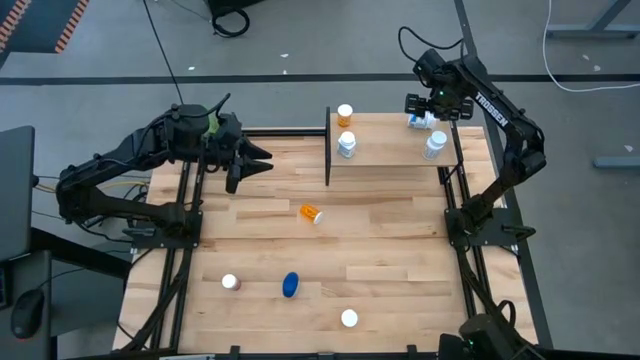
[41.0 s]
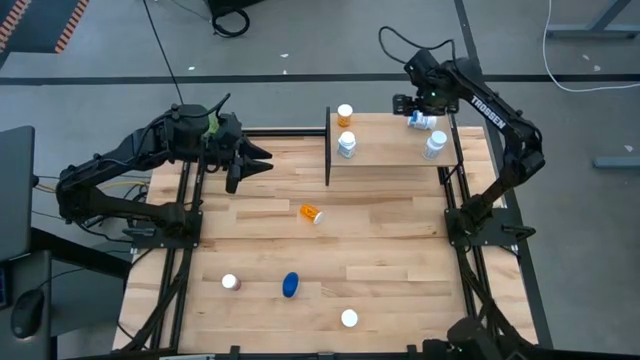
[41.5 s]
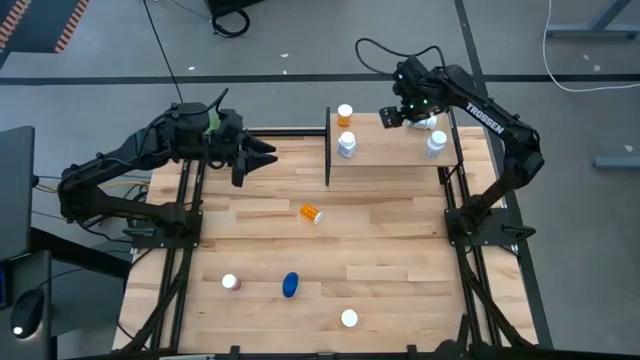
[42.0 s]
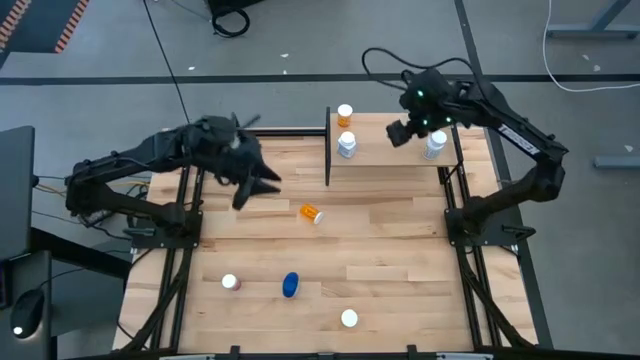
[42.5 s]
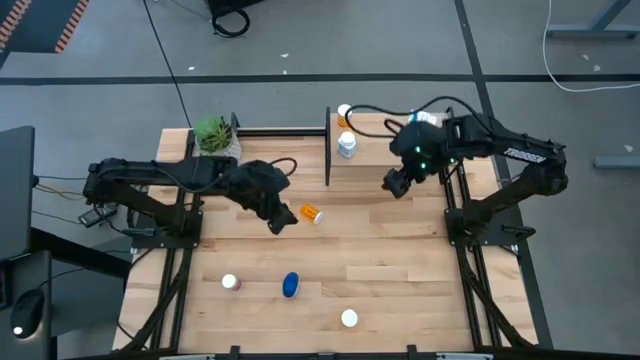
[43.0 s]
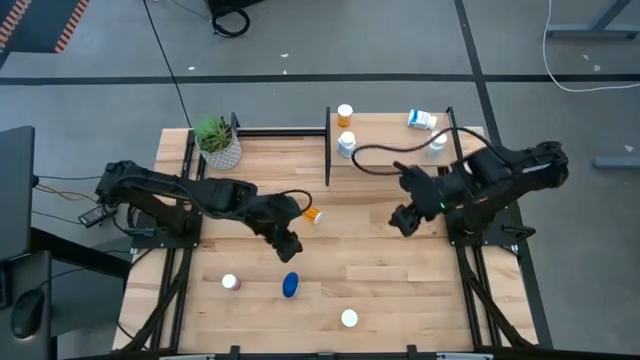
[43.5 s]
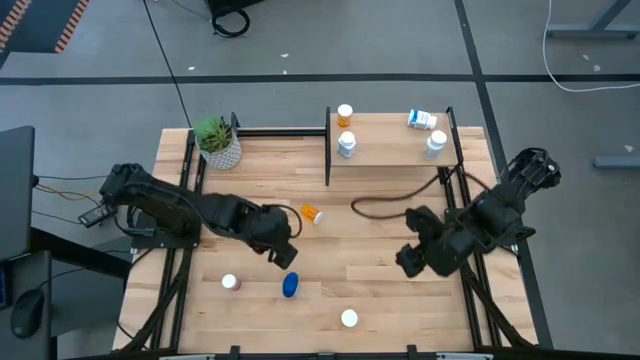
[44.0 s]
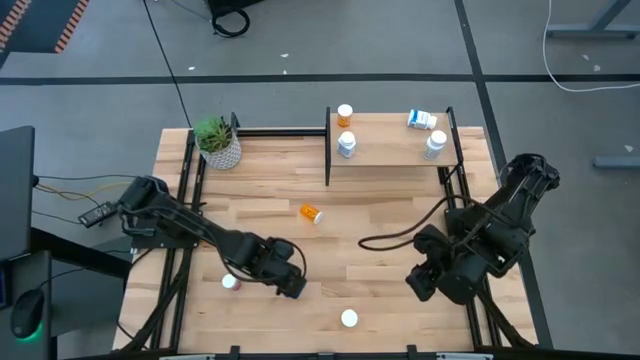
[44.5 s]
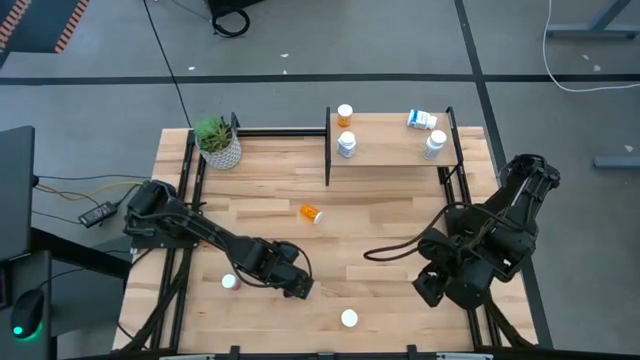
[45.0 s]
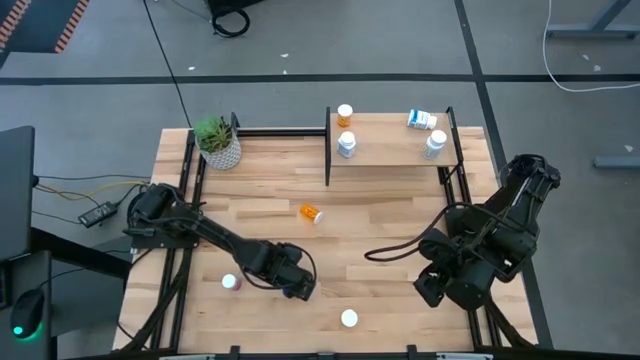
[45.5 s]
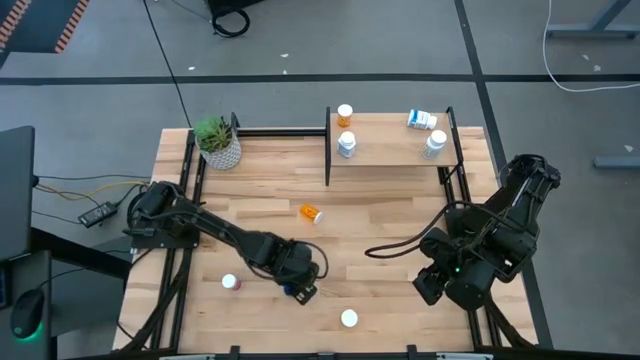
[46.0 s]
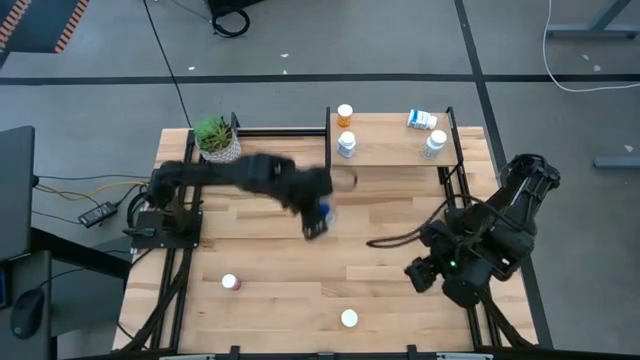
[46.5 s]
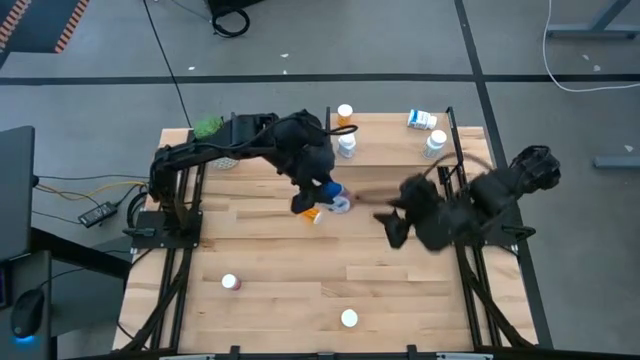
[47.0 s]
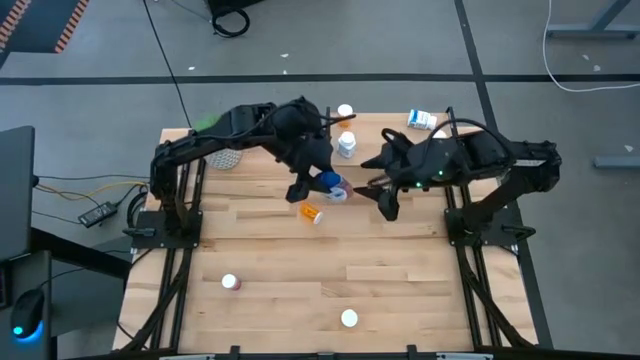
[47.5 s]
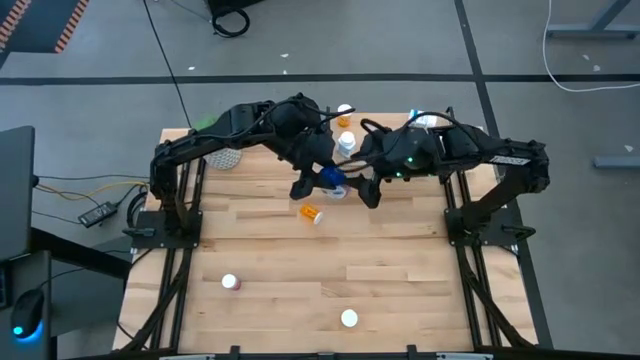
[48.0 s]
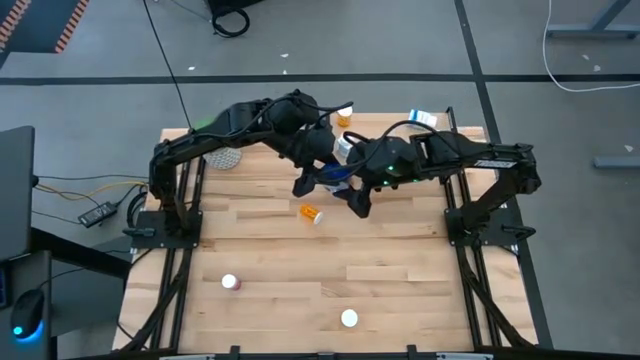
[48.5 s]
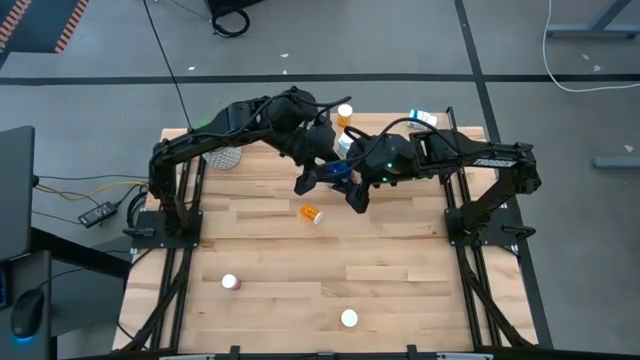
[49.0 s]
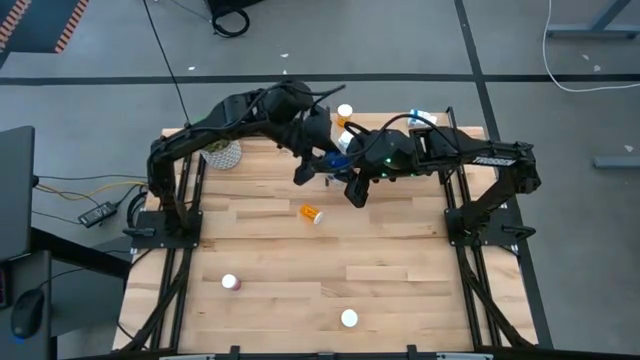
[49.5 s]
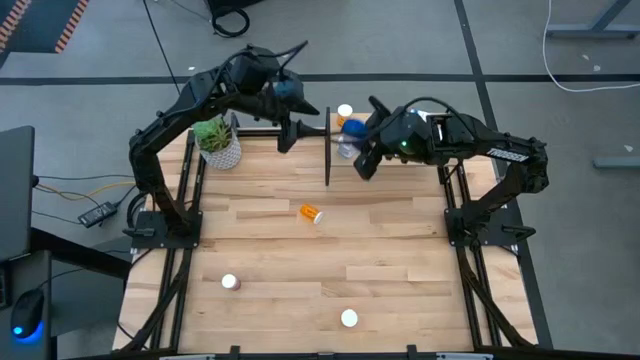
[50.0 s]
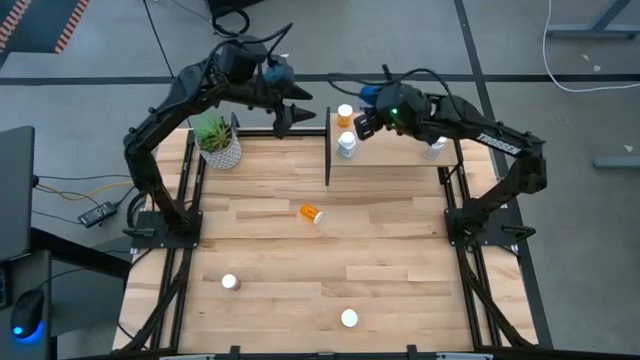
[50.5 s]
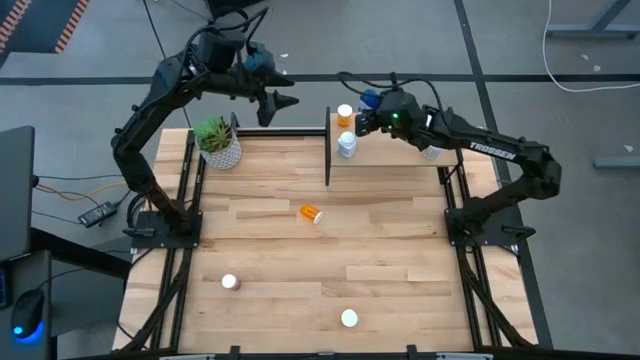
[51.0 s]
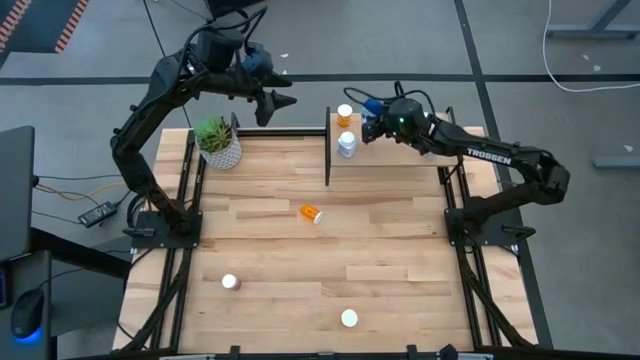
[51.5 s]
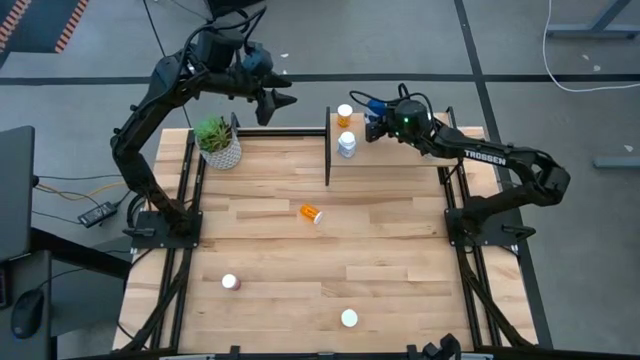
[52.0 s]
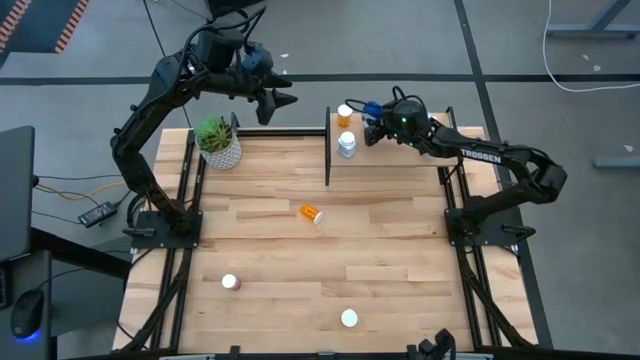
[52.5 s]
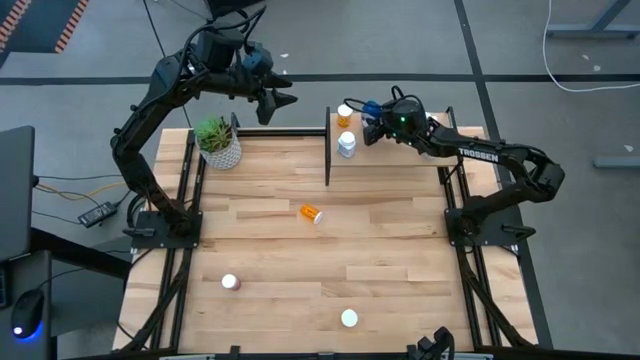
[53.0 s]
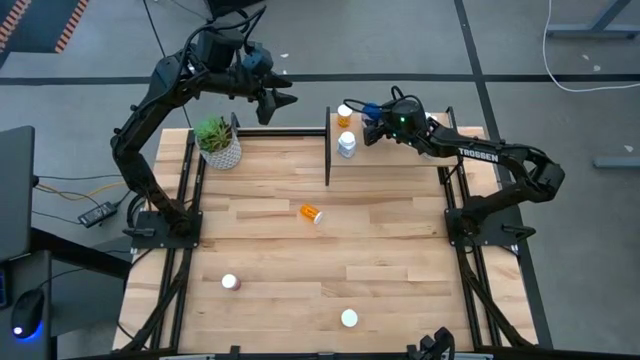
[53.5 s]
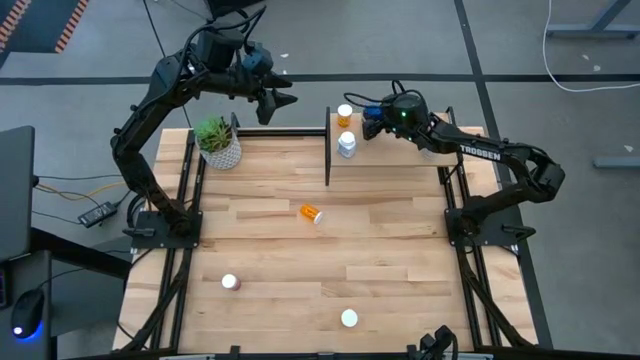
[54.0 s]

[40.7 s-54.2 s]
Task: Pick and place medicine bottles onto shelf by color
Put the blue pill bottle on the shelf

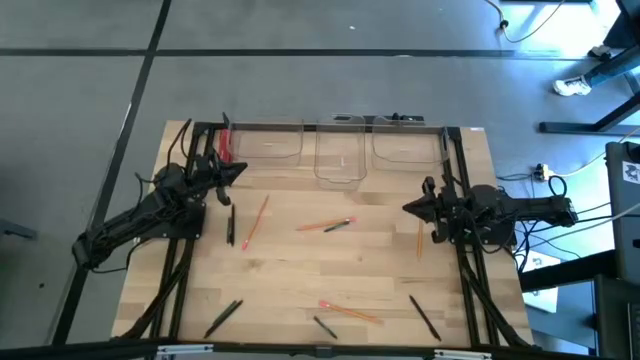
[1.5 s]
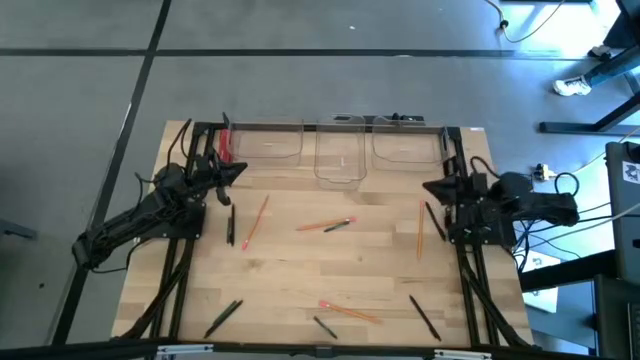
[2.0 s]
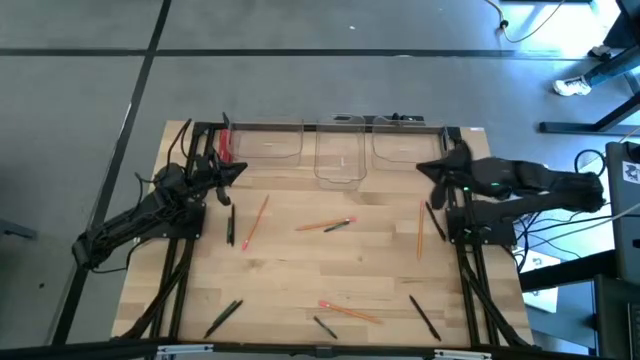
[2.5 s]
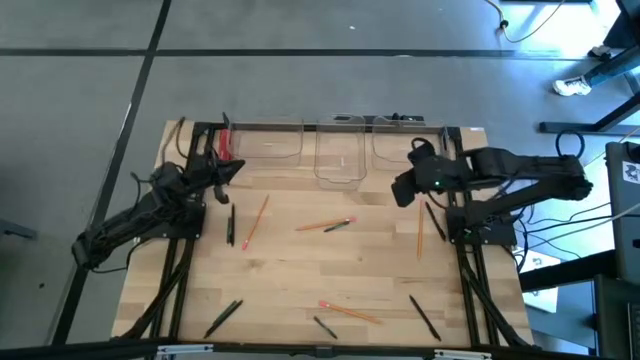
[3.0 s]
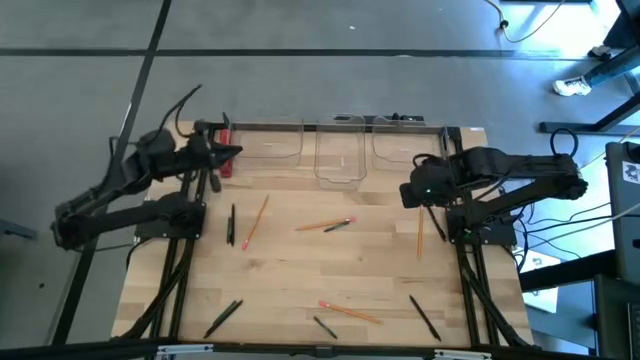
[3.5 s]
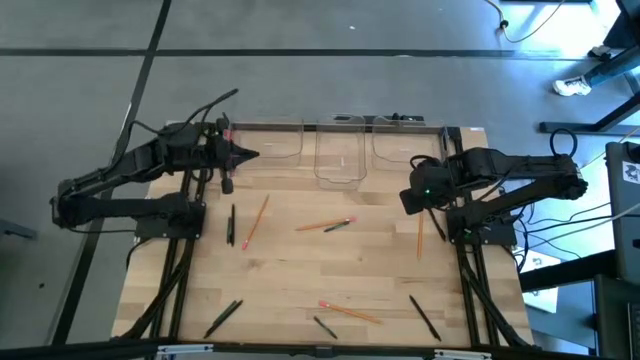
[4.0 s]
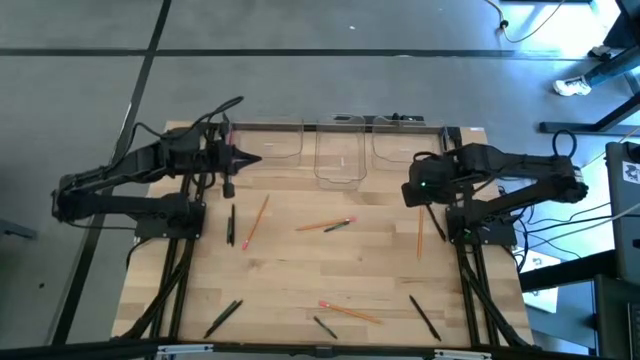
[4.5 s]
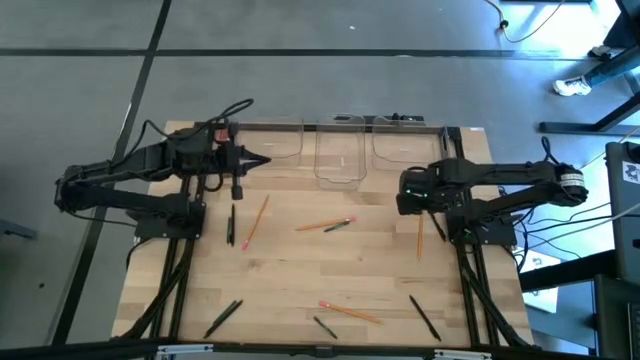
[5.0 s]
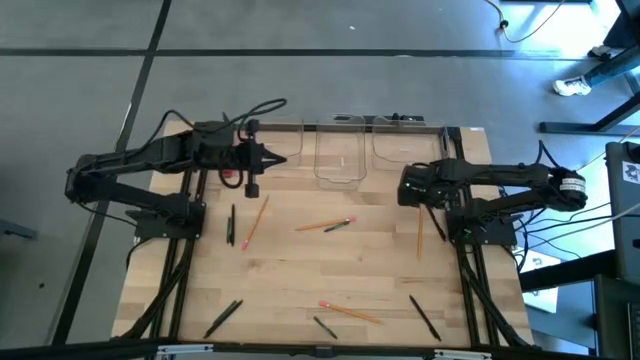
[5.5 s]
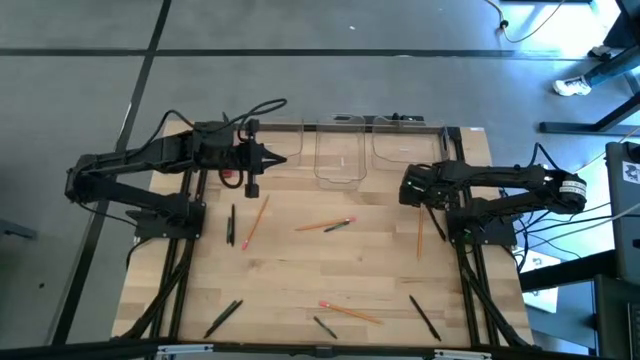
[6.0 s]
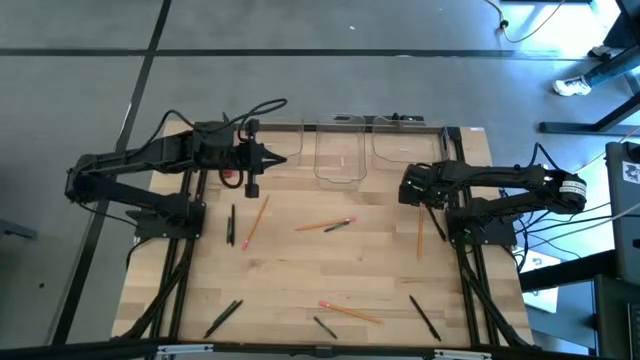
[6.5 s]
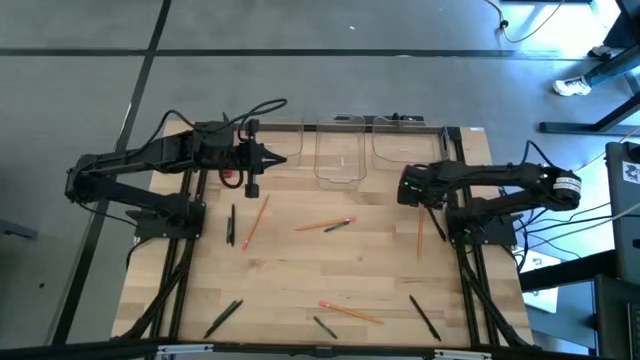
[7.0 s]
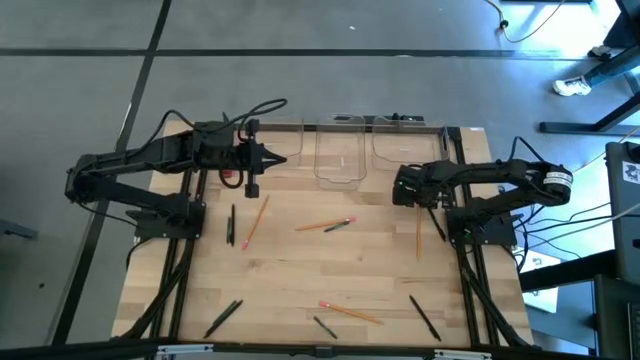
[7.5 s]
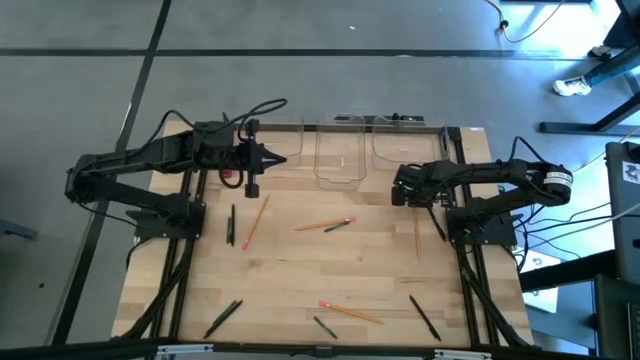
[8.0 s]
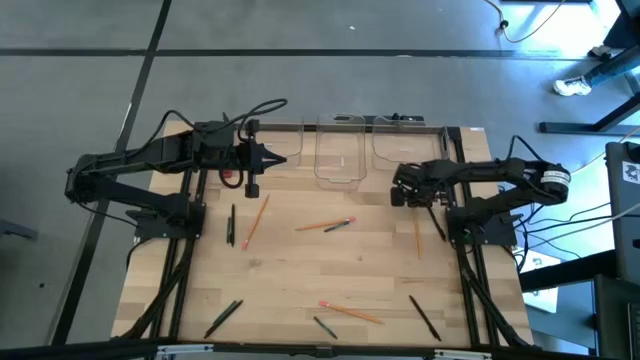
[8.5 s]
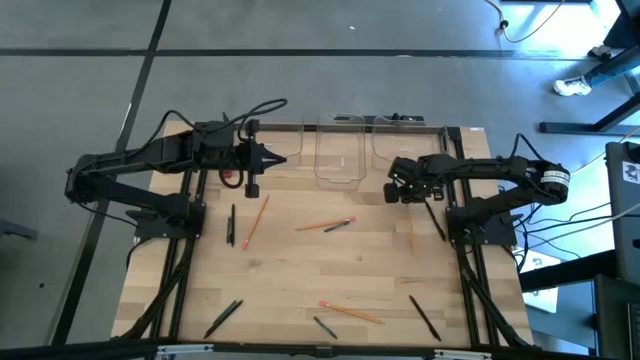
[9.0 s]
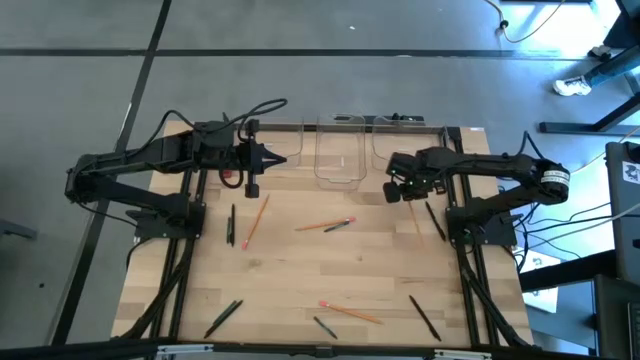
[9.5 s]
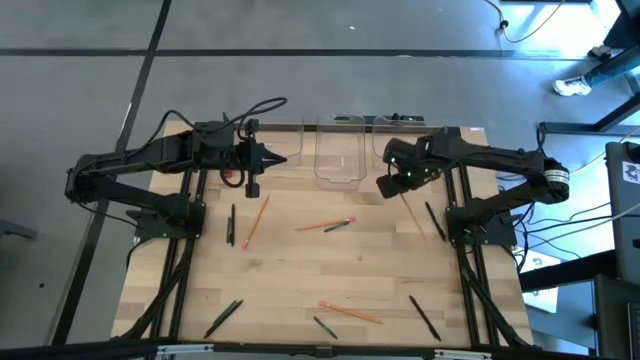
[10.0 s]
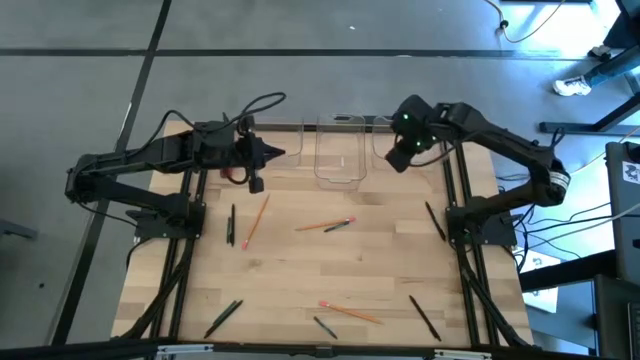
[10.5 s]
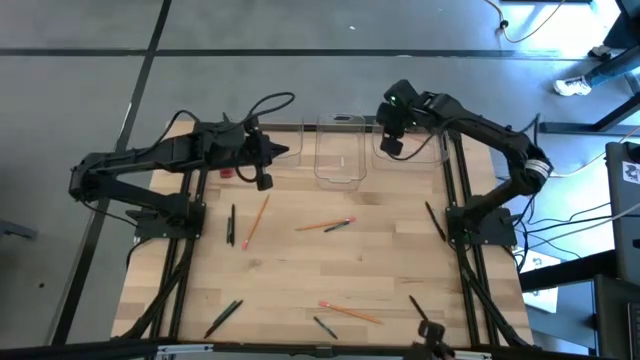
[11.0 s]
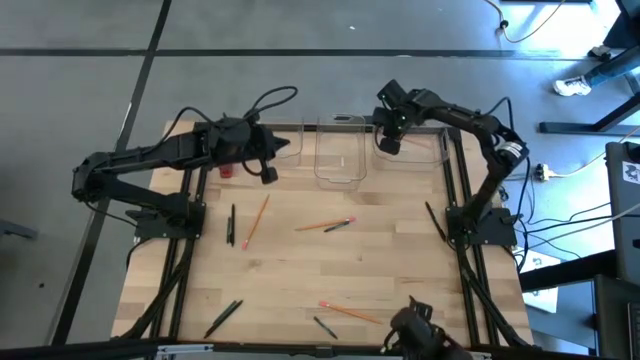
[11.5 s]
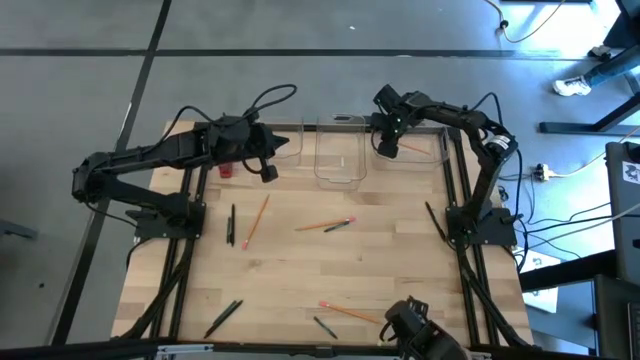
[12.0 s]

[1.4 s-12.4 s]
Task: Sort crayons/erasers/pens/pencils in bins
Put the orange pencil into the right transparent bin
